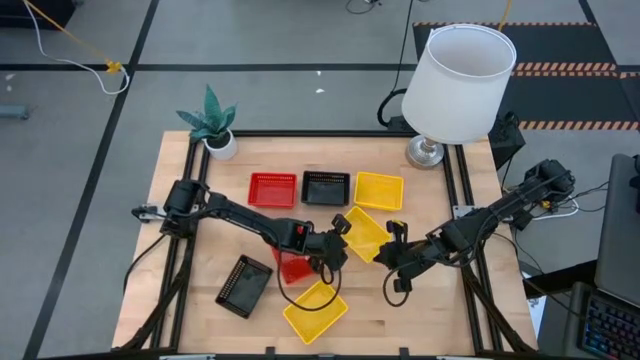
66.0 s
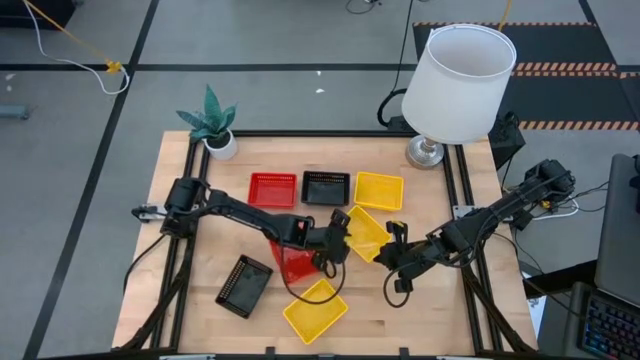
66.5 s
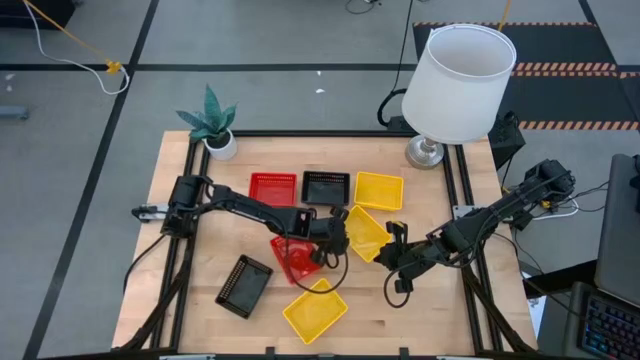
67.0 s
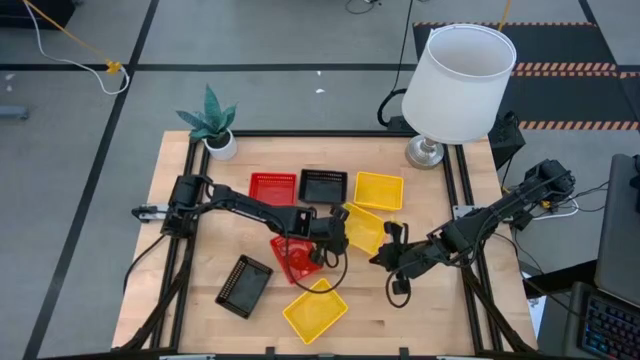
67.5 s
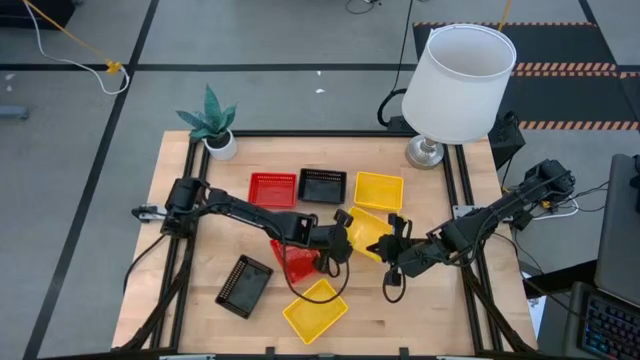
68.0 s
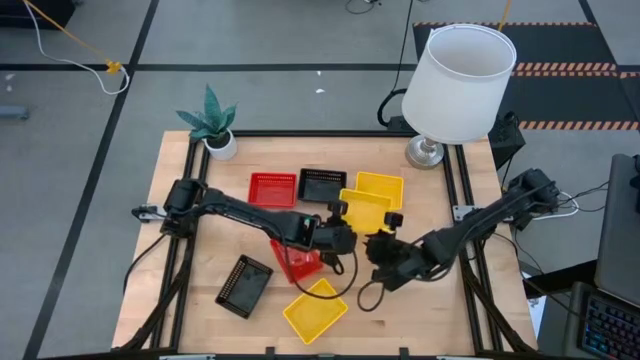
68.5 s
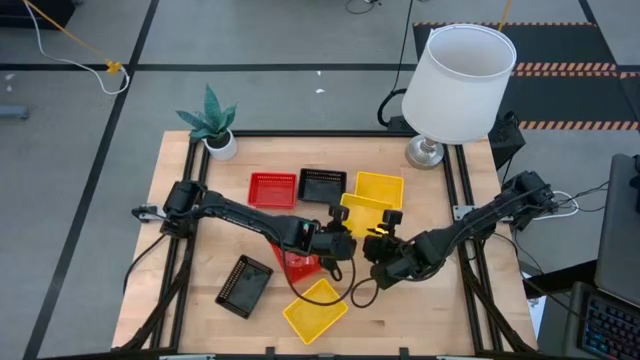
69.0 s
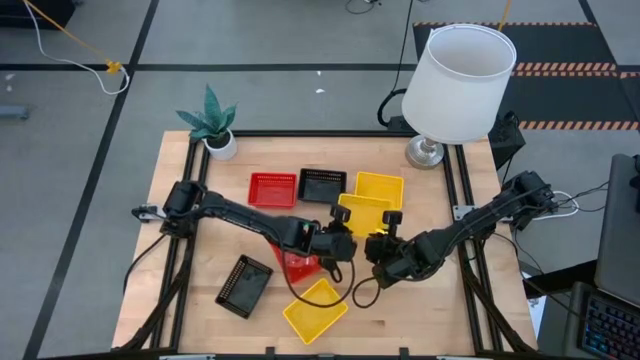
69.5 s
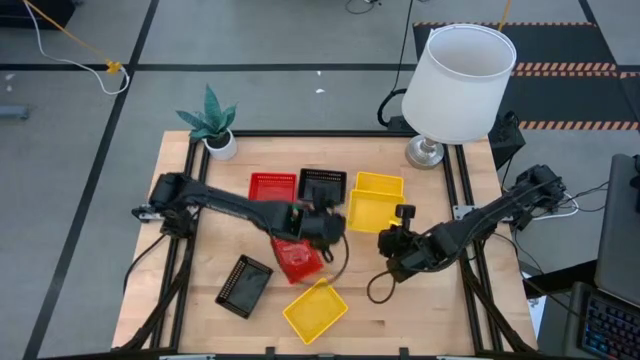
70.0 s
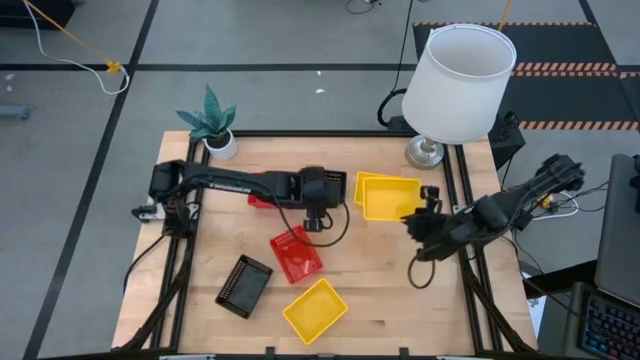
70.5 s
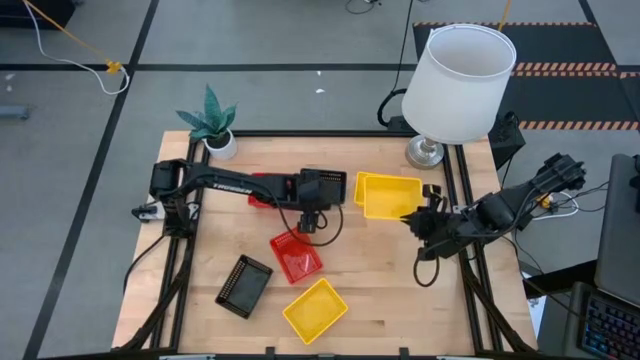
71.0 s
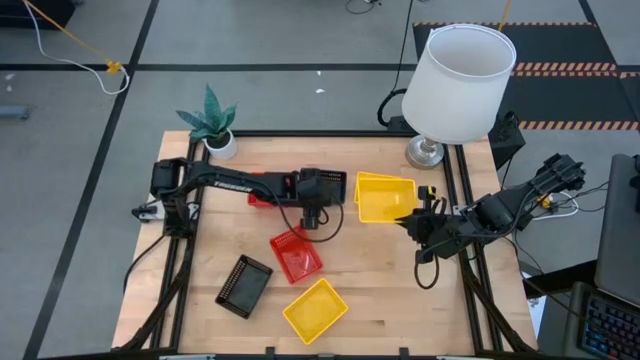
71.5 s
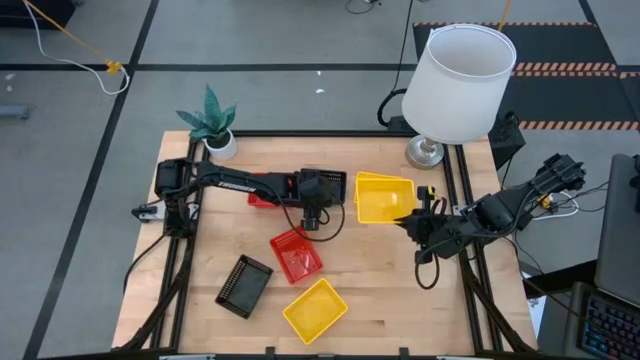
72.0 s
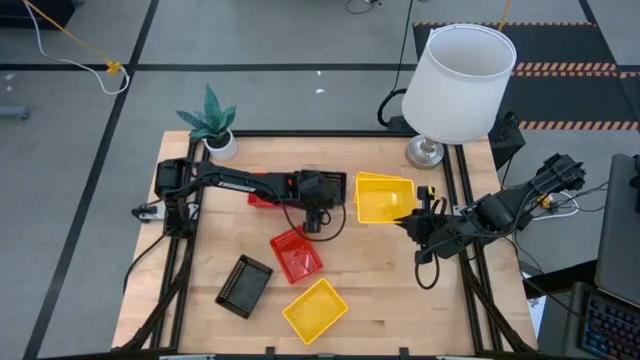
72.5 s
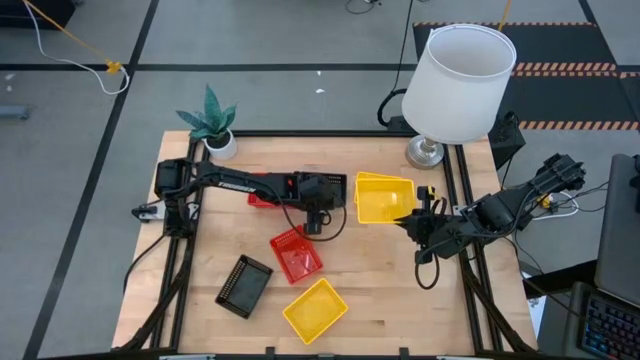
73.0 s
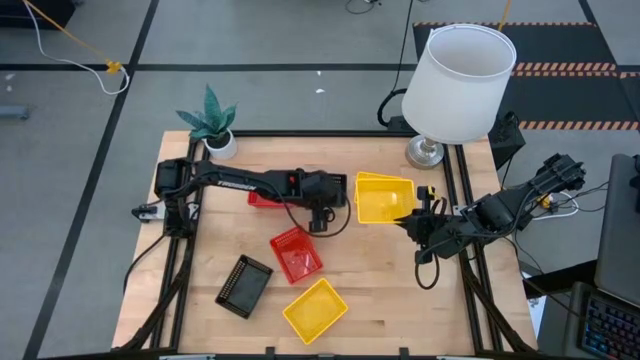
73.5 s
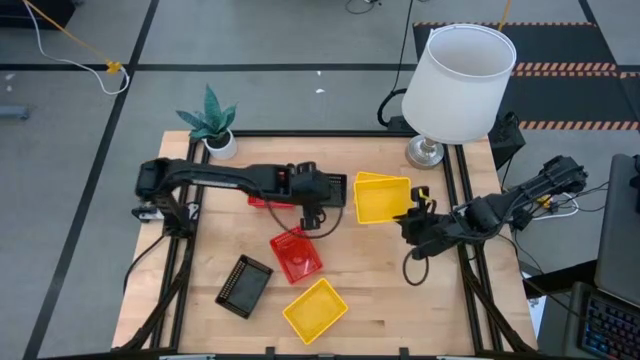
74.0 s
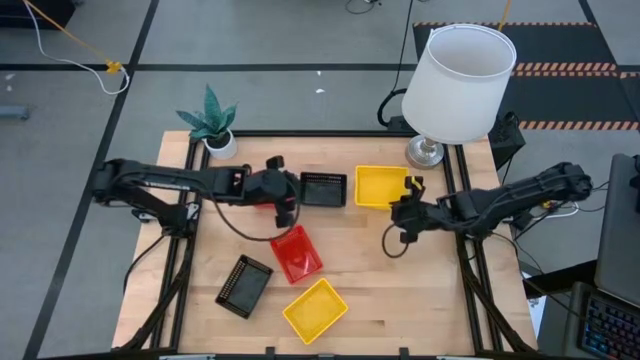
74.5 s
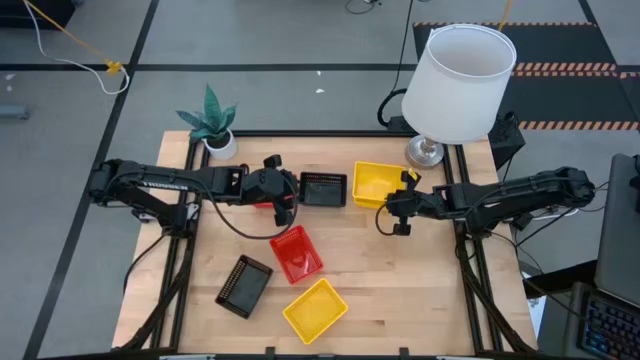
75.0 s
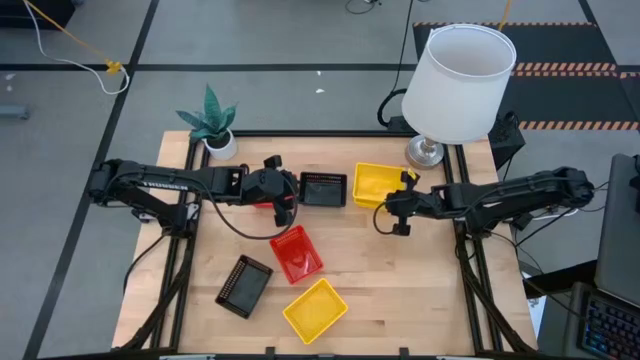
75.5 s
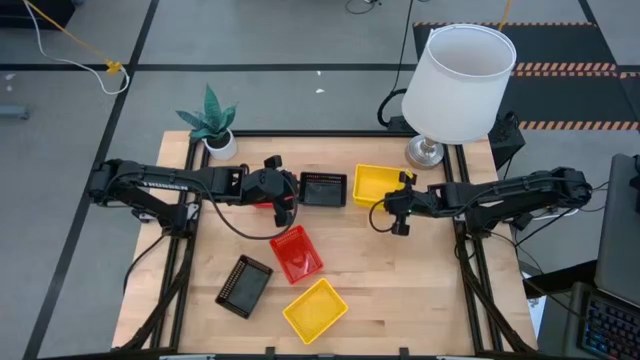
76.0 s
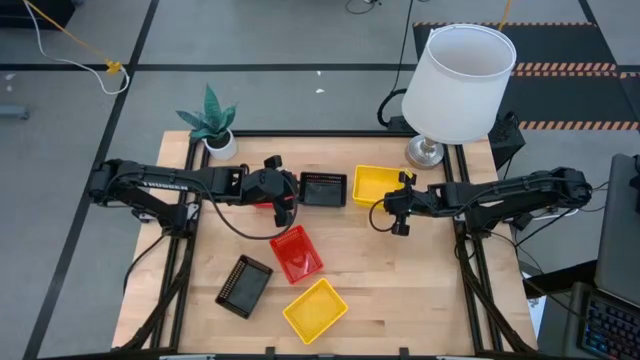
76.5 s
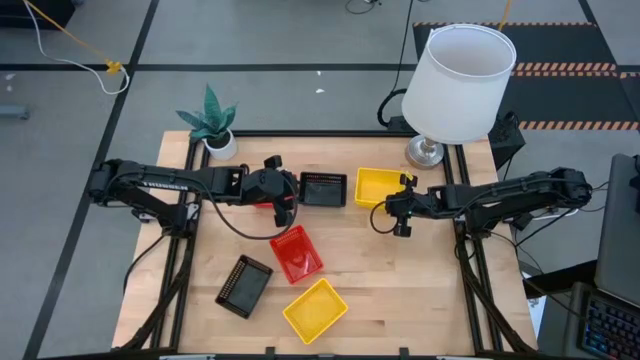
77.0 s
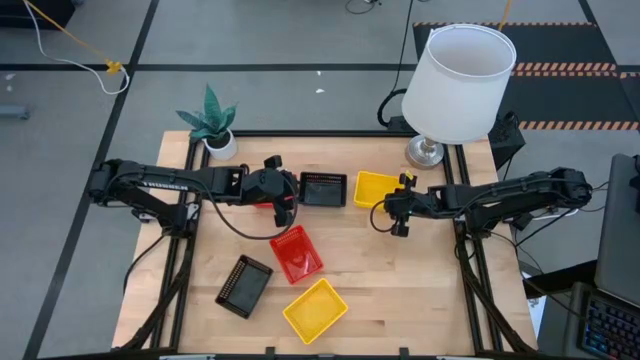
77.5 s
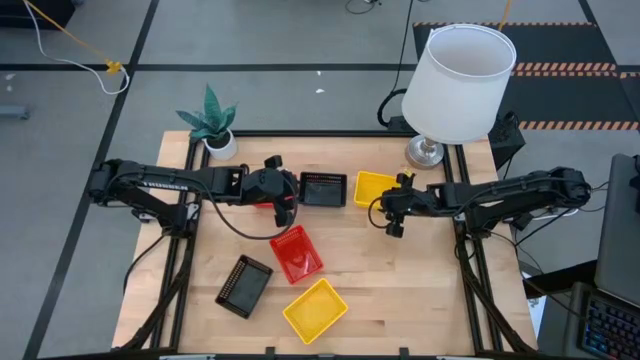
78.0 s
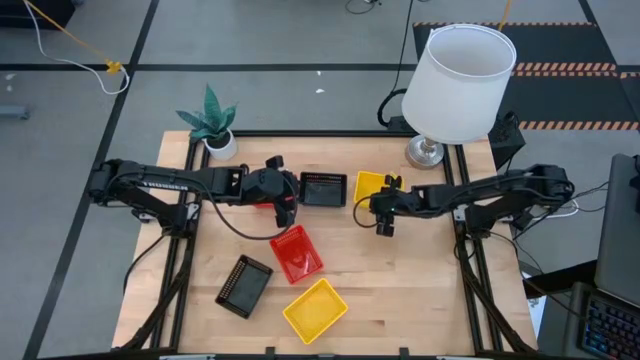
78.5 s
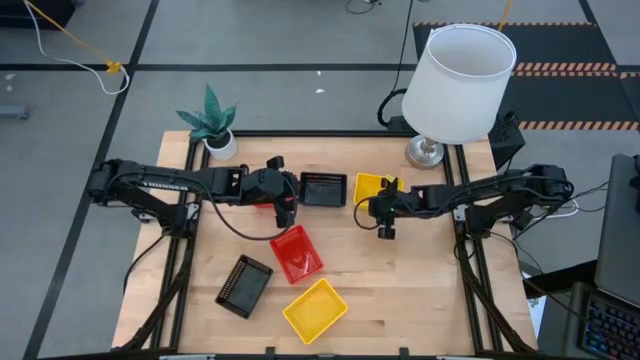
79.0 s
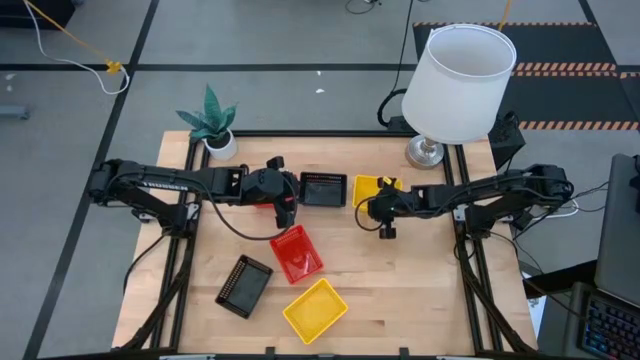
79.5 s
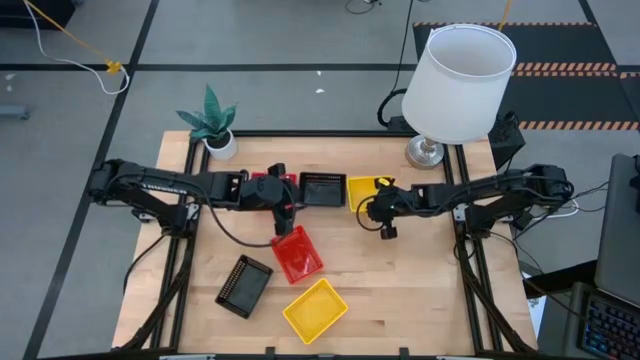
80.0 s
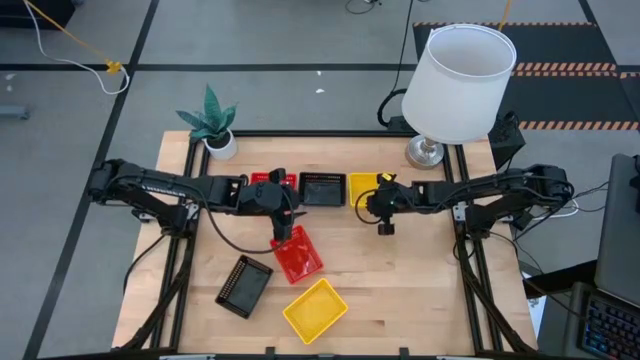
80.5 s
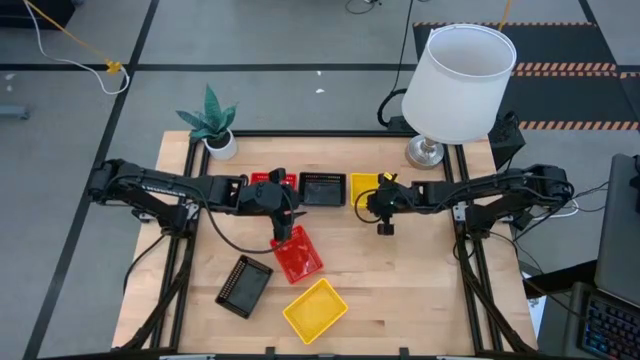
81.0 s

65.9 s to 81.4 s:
Stack the middle yellow bin on top of the top yellow bin
